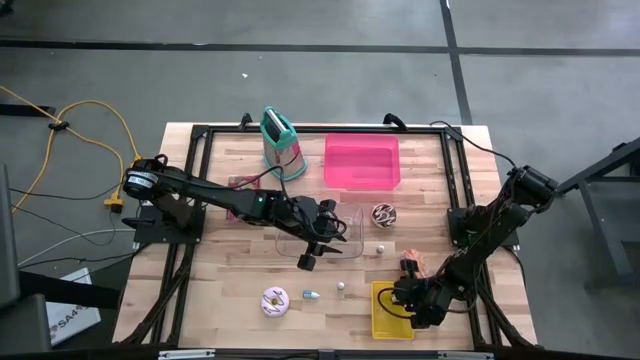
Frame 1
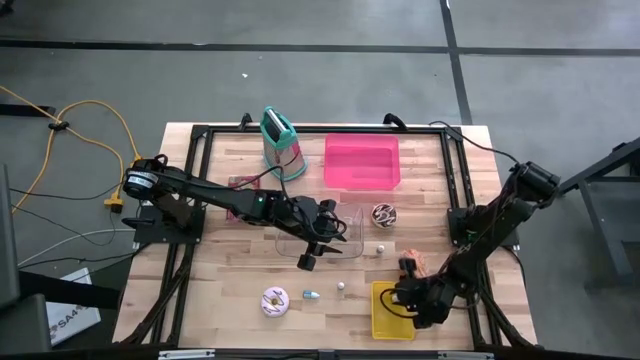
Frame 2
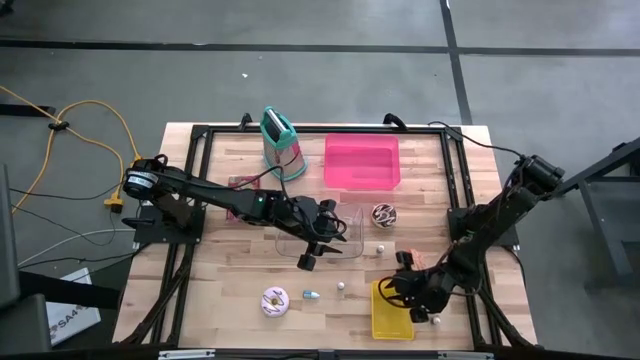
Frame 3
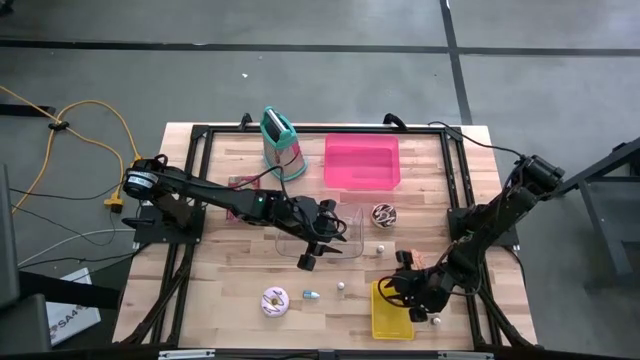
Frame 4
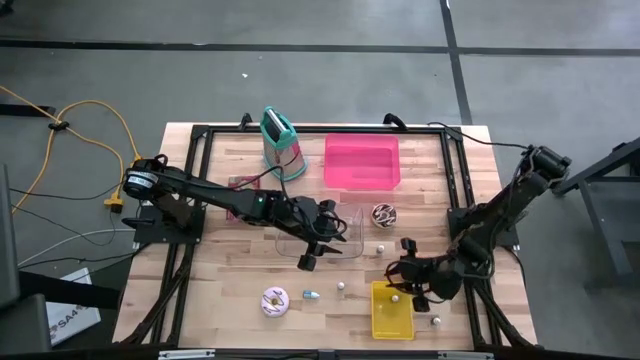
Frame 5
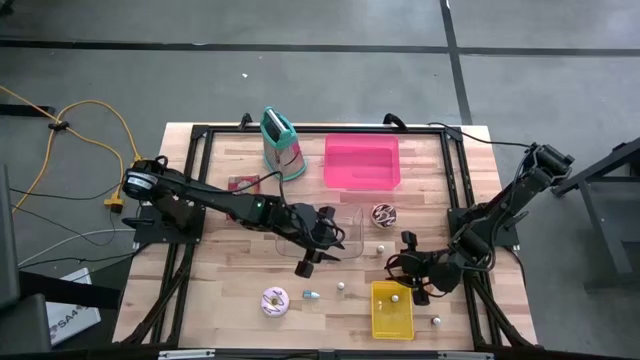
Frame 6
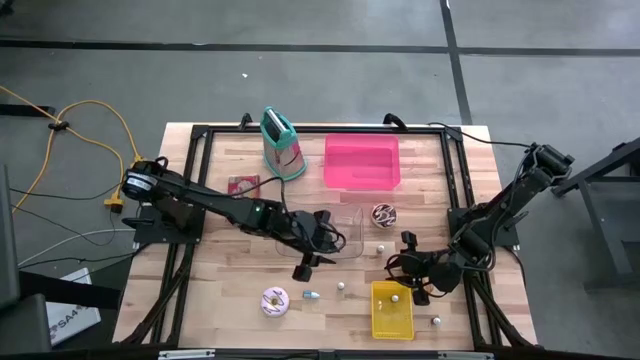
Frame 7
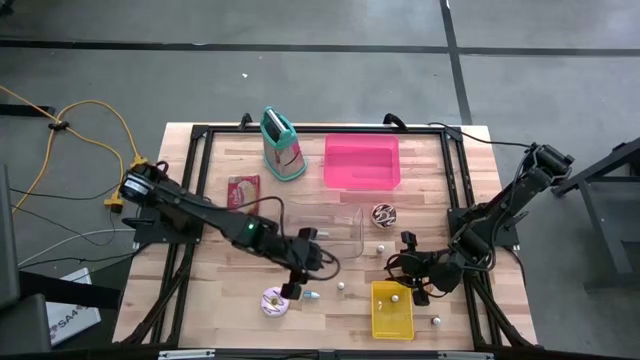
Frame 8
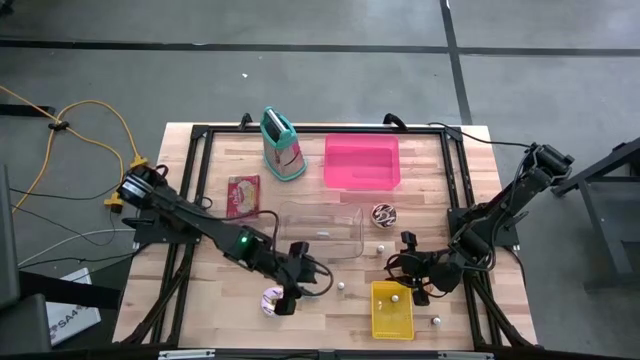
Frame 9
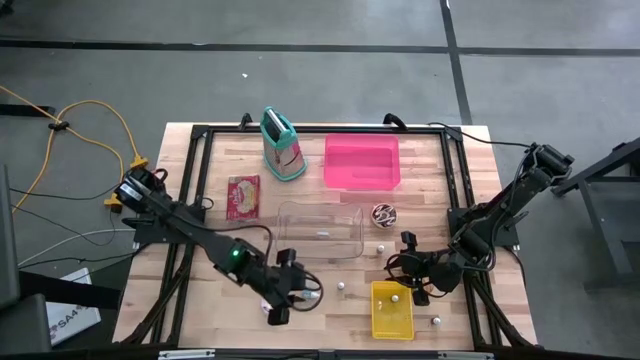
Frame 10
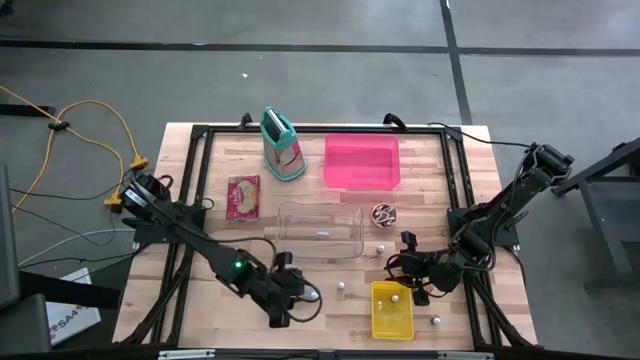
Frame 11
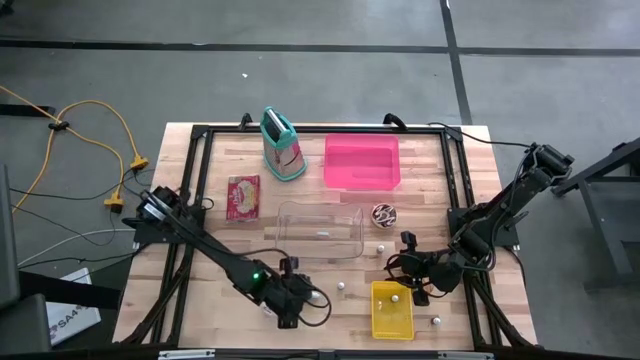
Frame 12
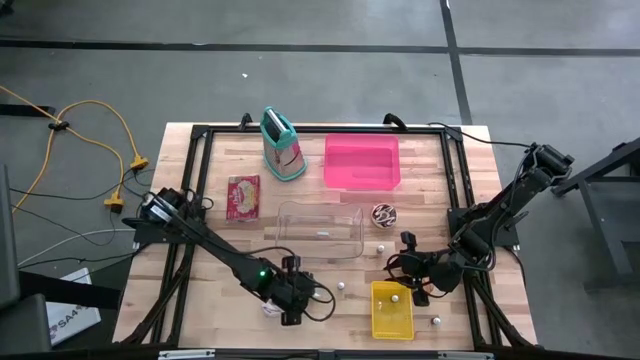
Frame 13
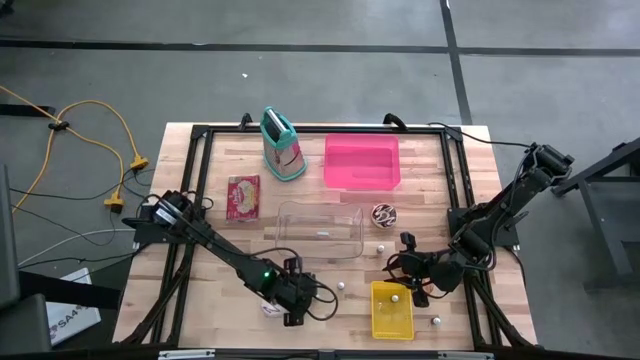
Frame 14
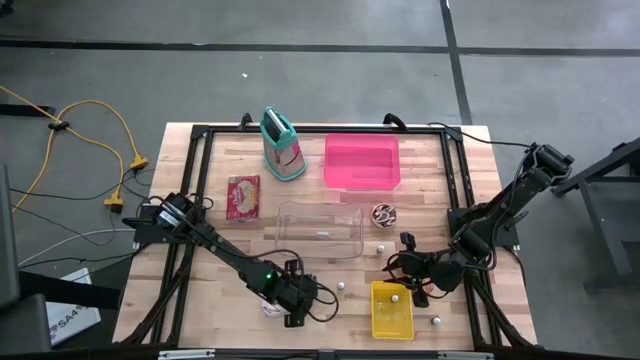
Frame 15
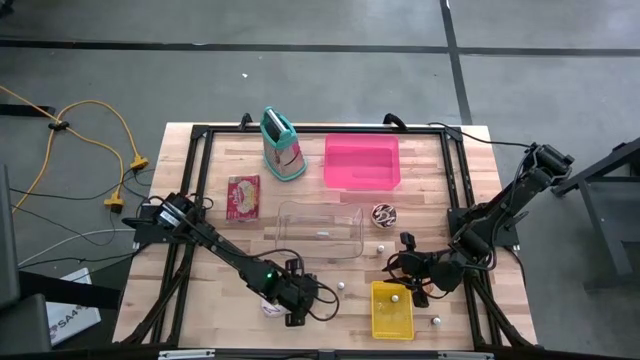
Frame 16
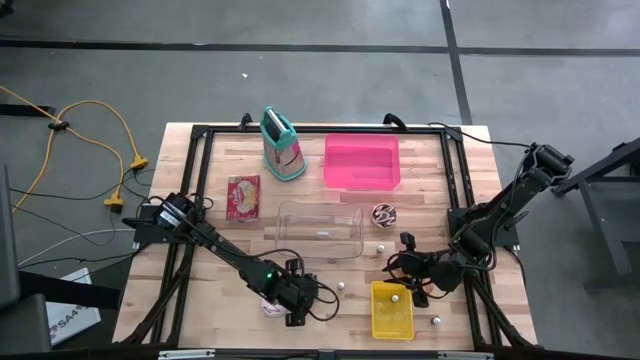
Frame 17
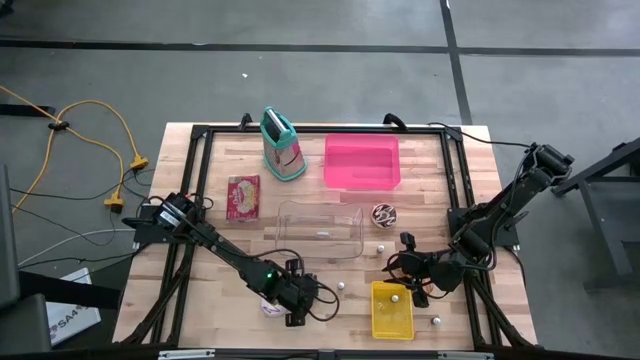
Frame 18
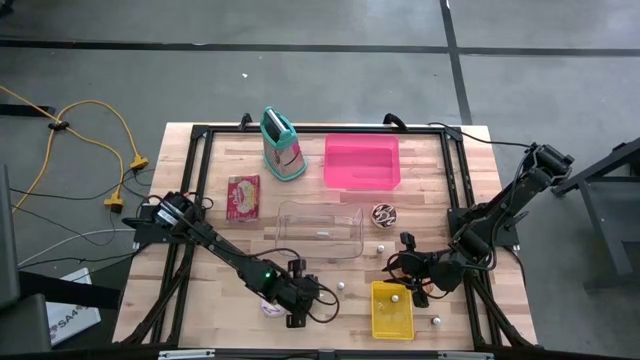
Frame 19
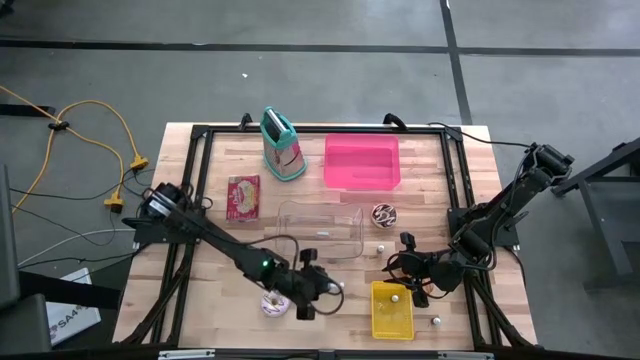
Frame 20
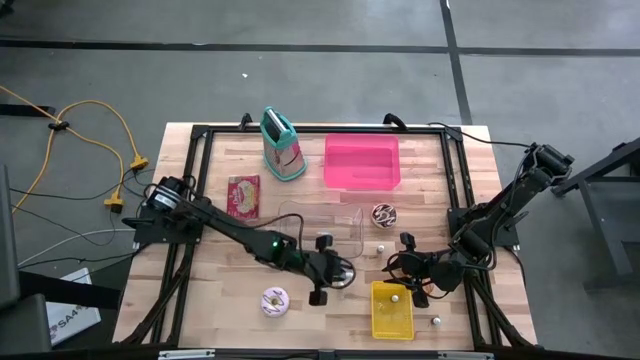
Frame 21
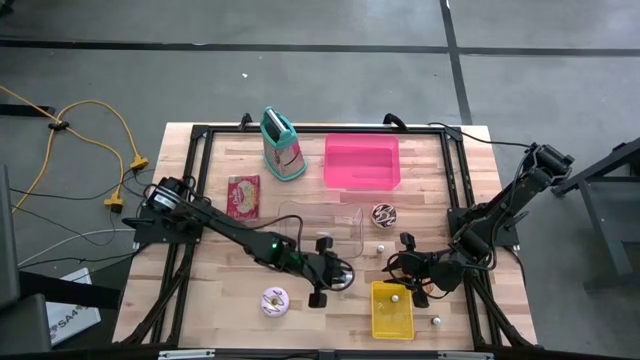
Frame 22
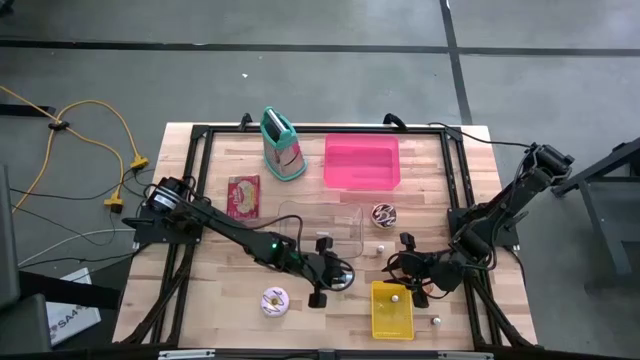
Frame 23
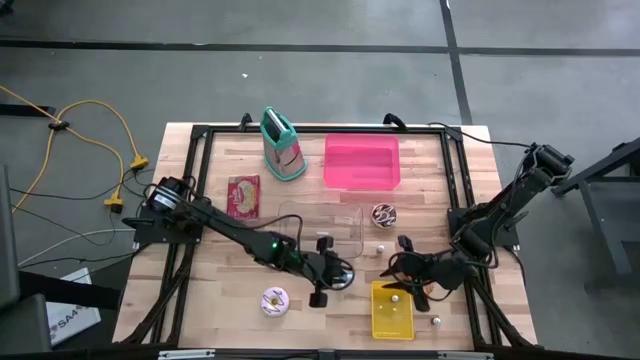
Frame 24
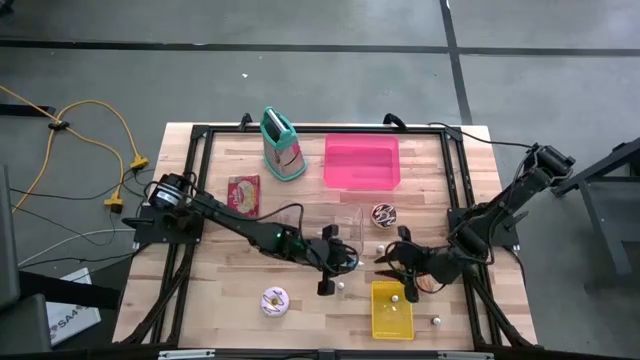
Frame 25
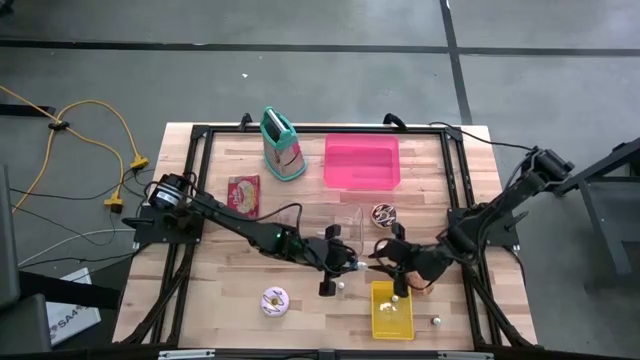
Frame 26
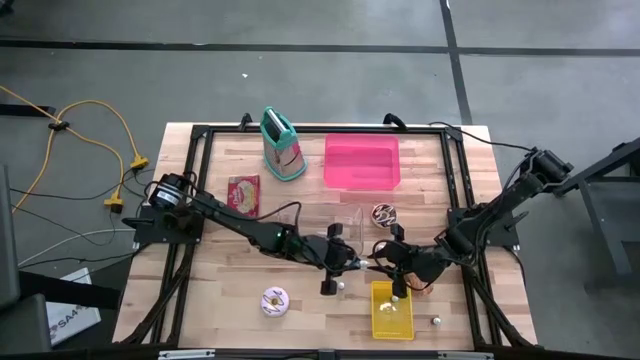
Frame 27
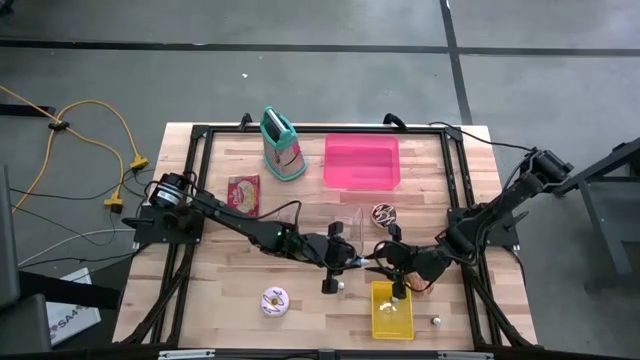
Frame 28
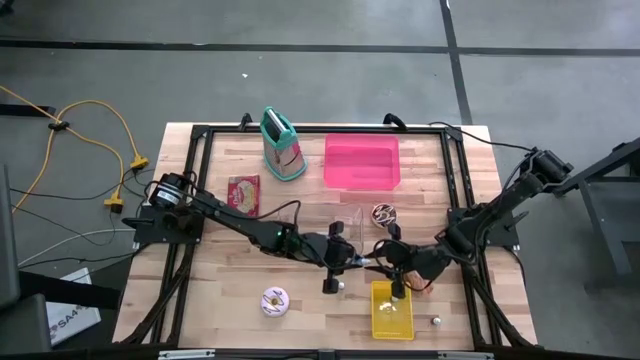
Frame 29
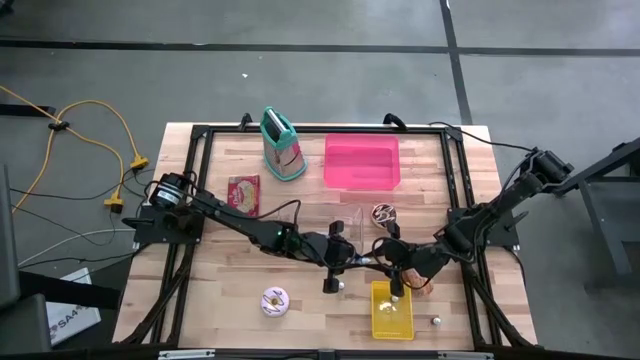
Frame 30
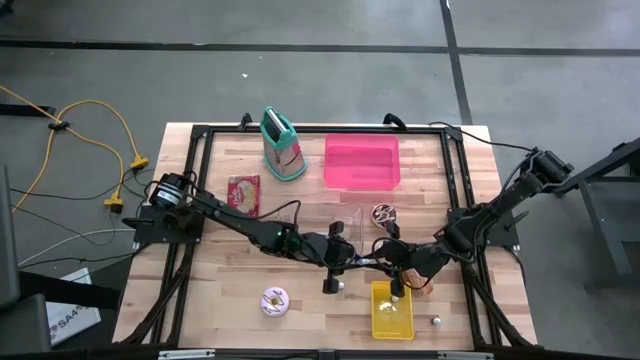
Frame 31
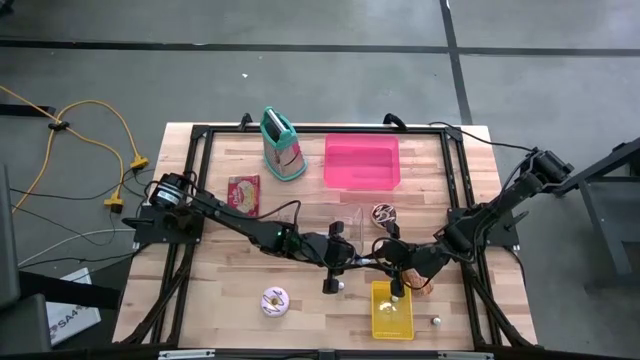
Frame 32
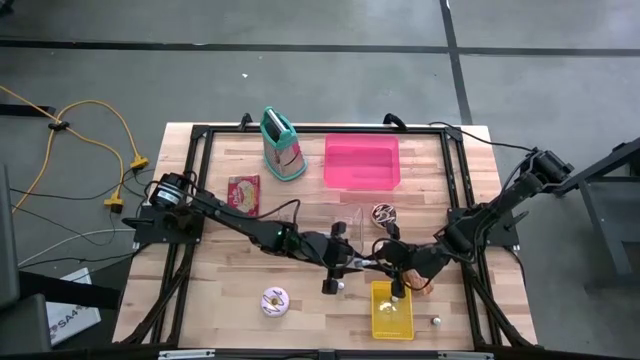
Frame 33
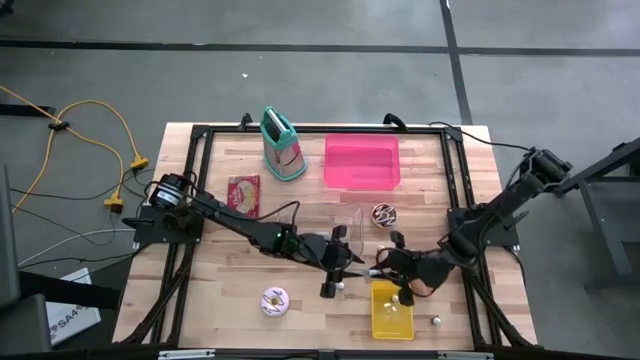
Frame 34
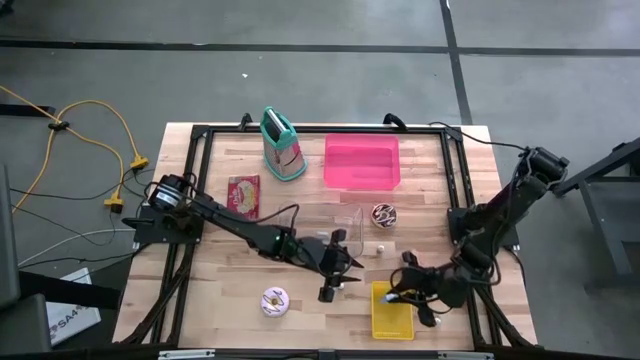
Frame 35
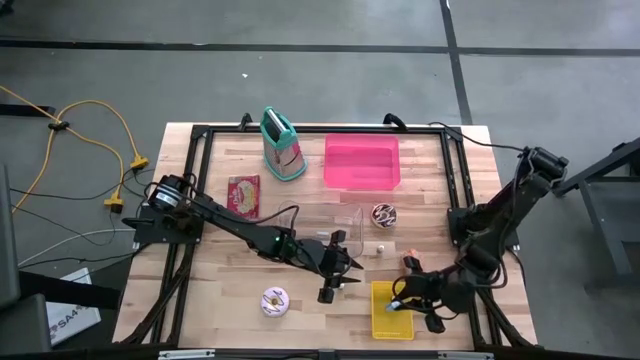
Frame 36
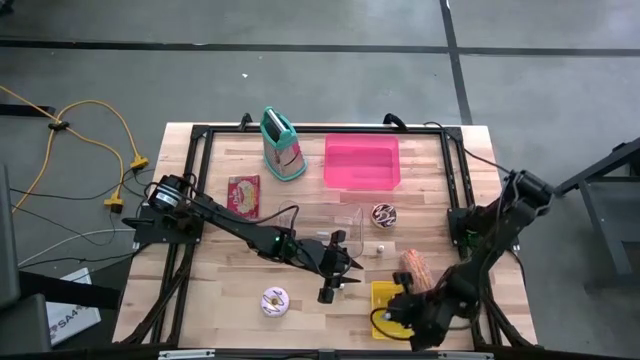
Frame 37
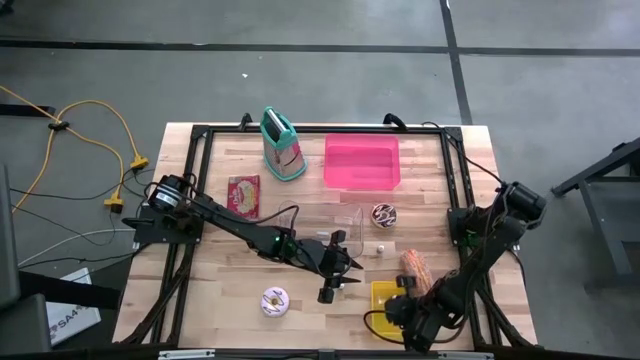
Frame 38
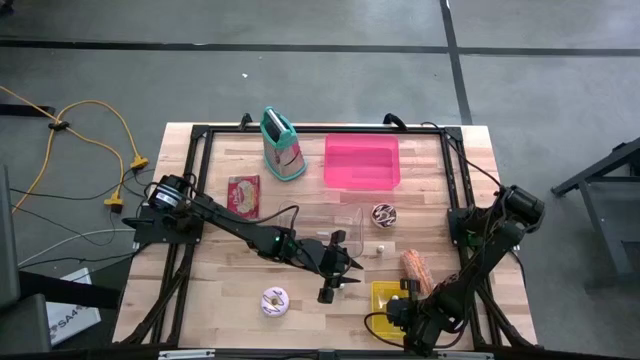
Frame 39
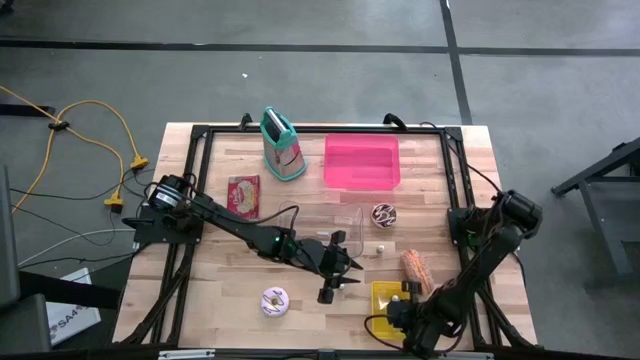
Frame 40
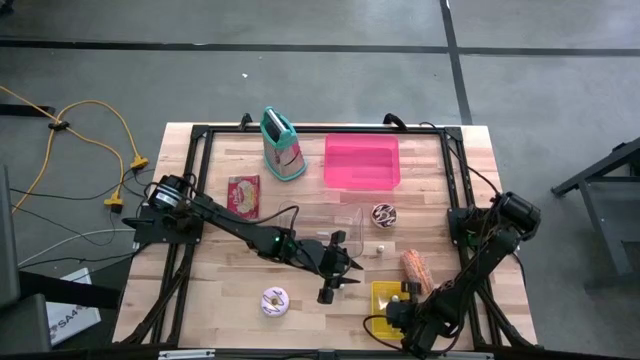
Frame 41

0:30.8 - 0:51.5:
Put the blue food coloring bottle into the yellow bin
